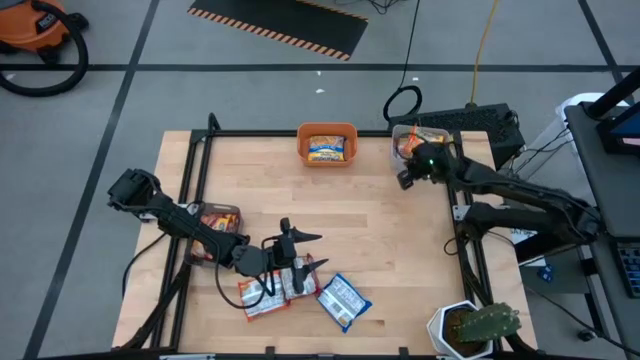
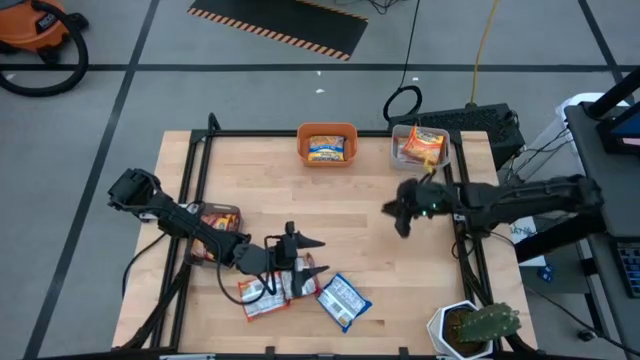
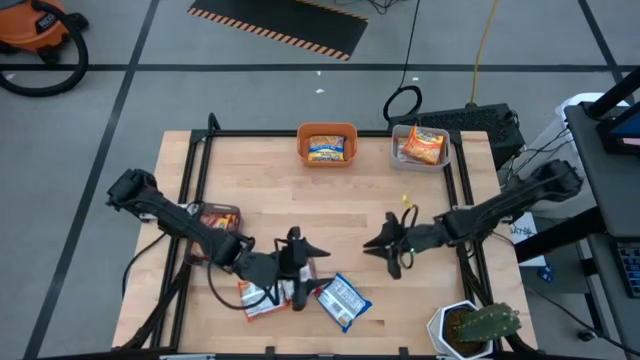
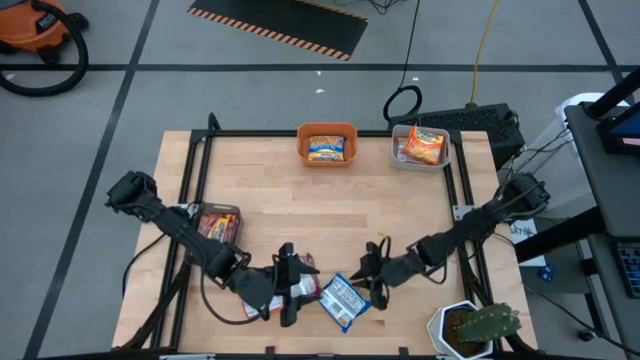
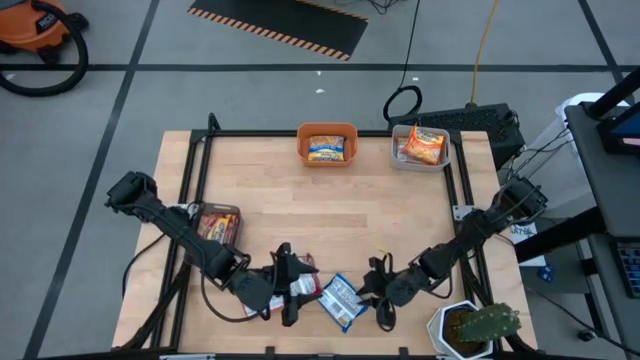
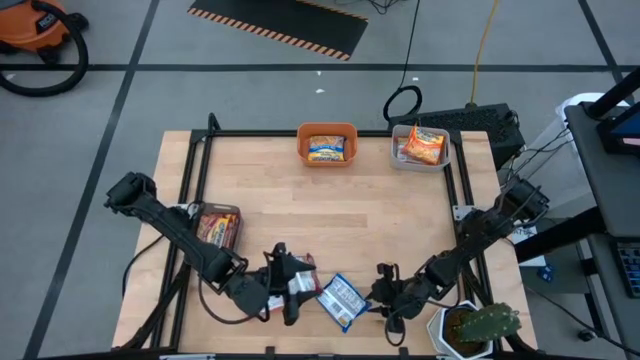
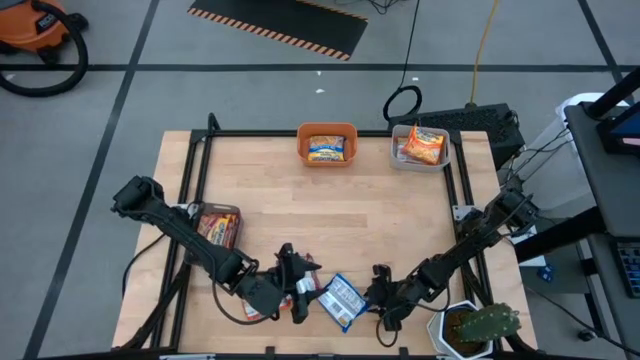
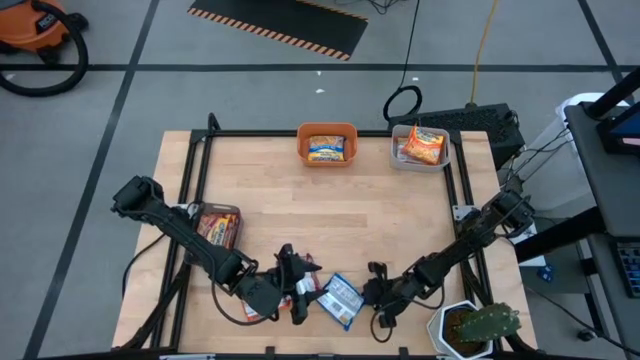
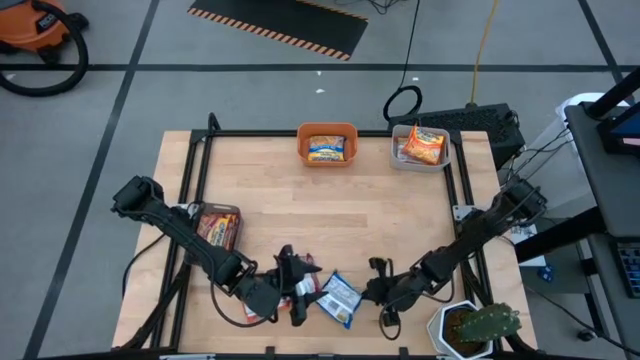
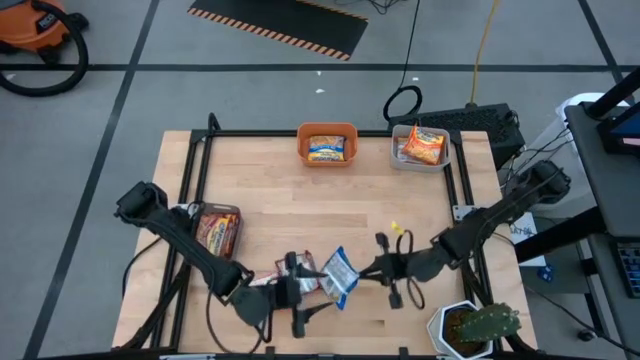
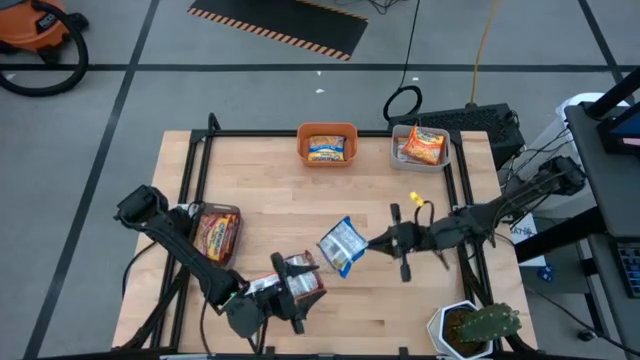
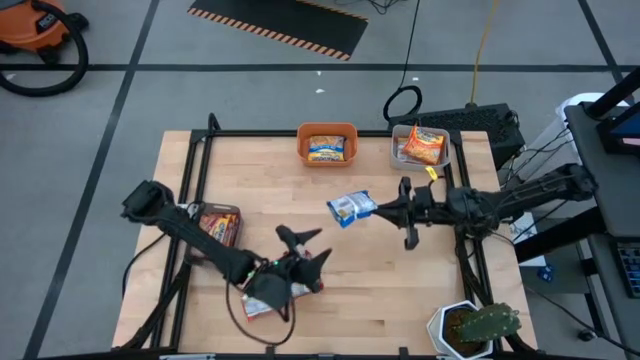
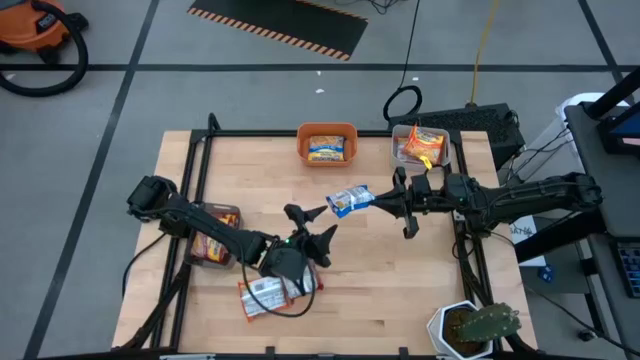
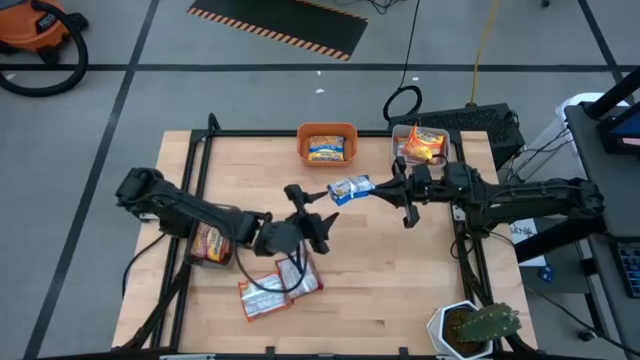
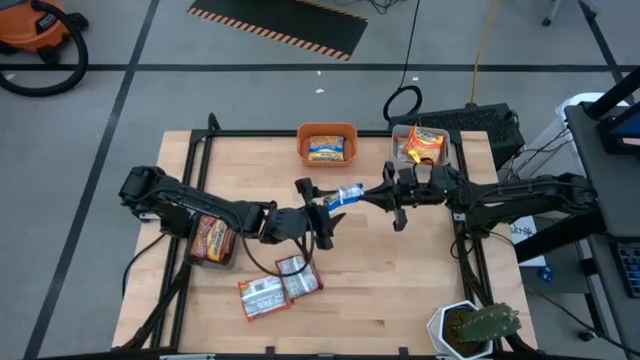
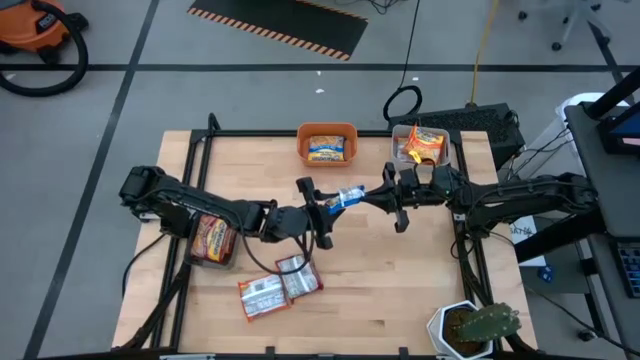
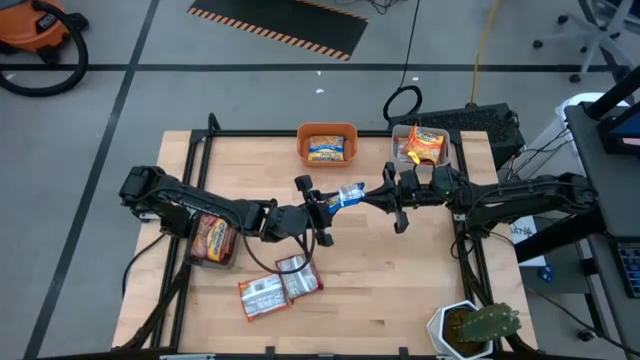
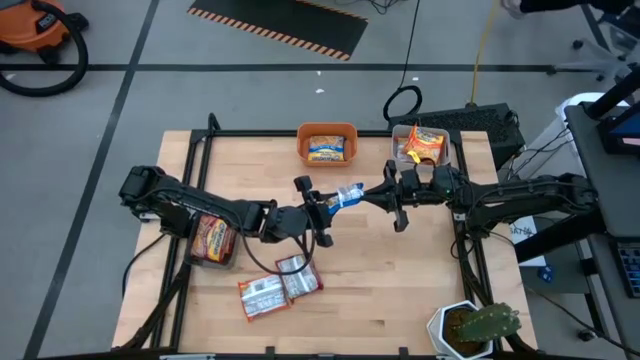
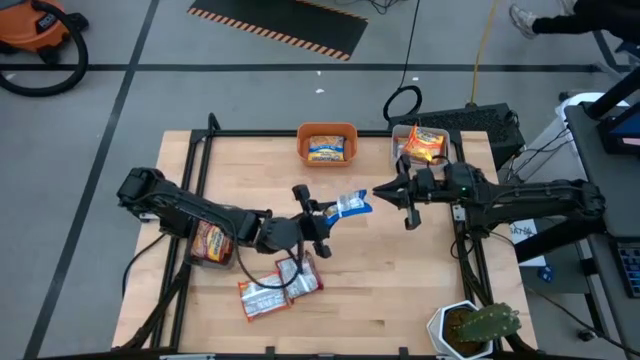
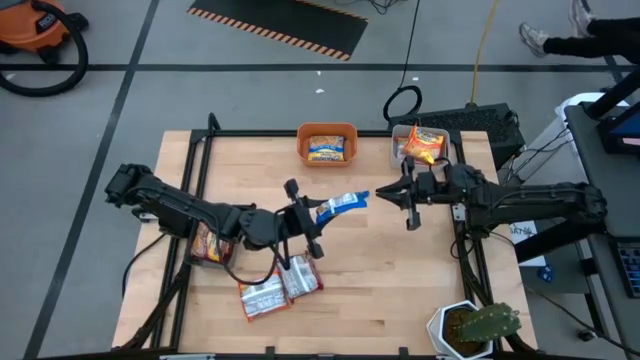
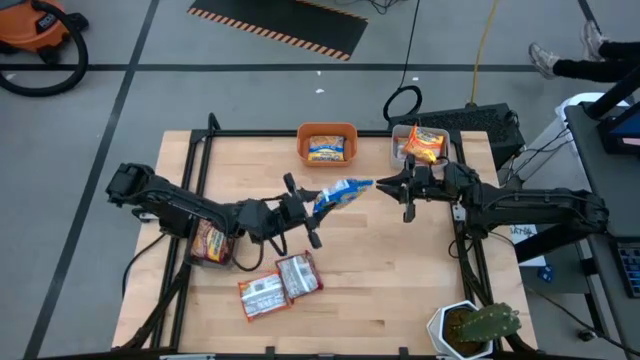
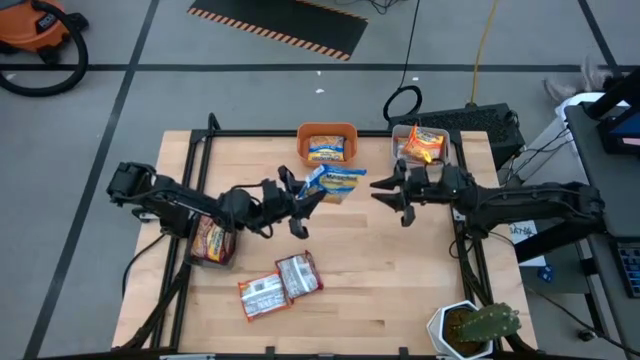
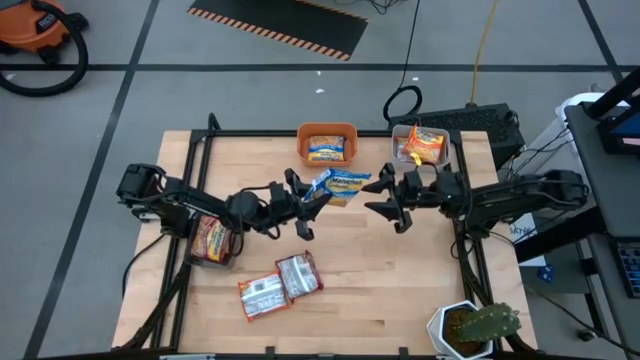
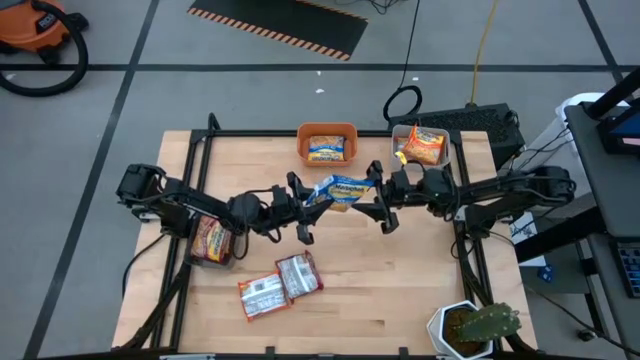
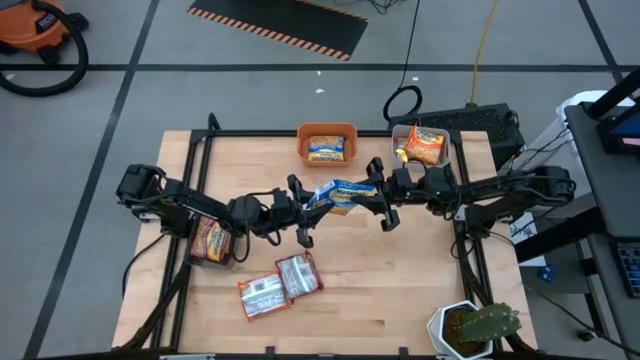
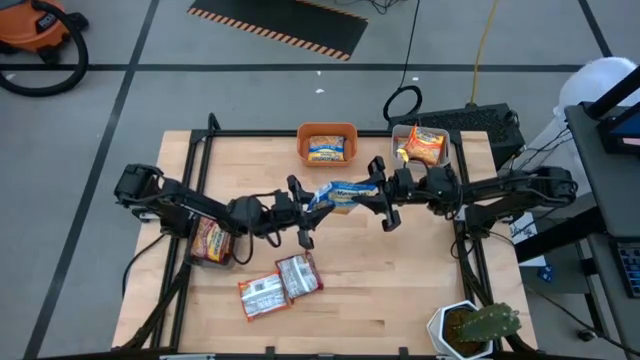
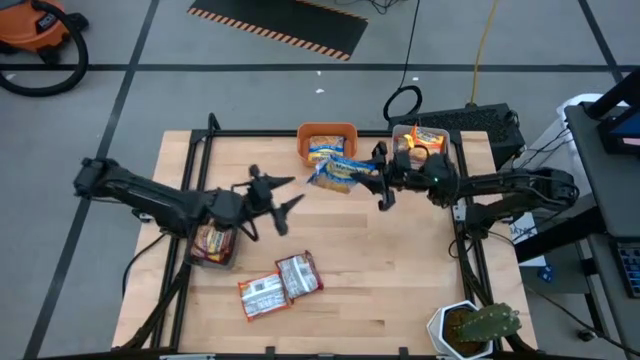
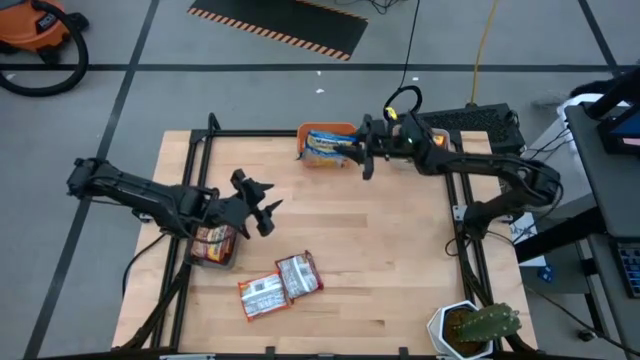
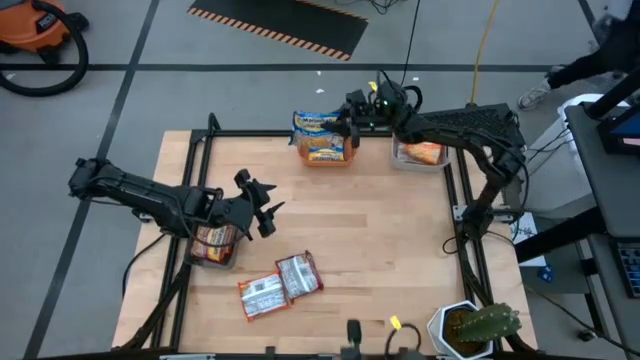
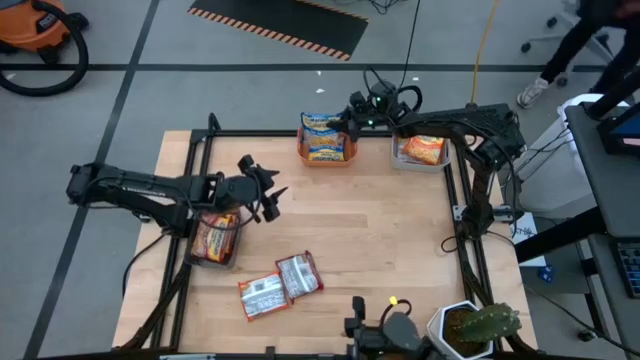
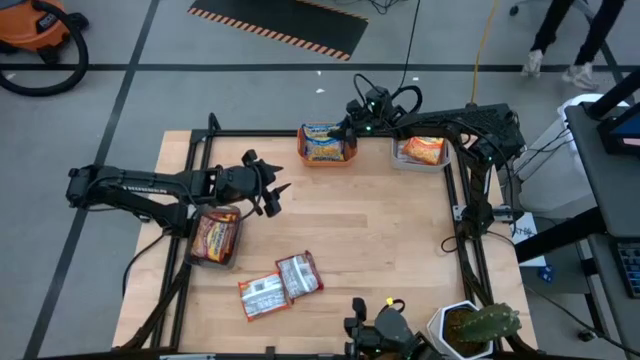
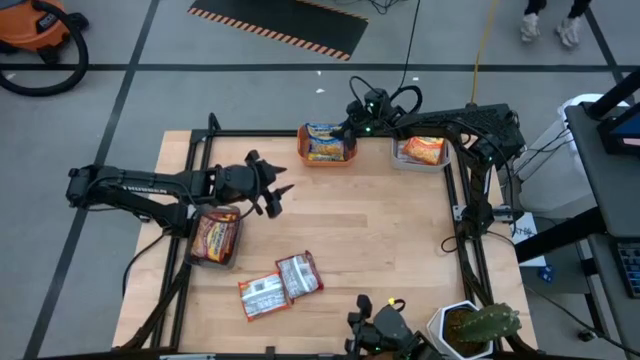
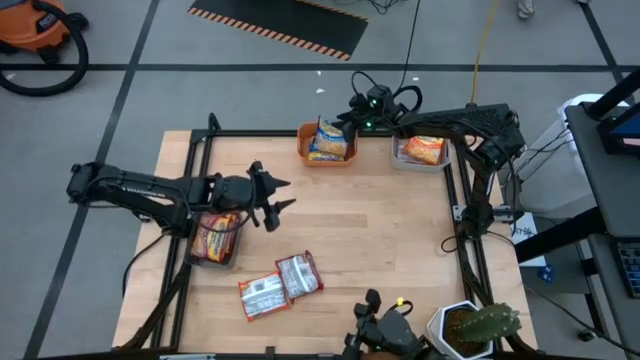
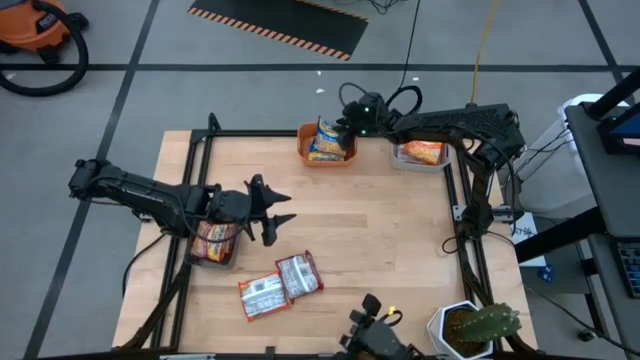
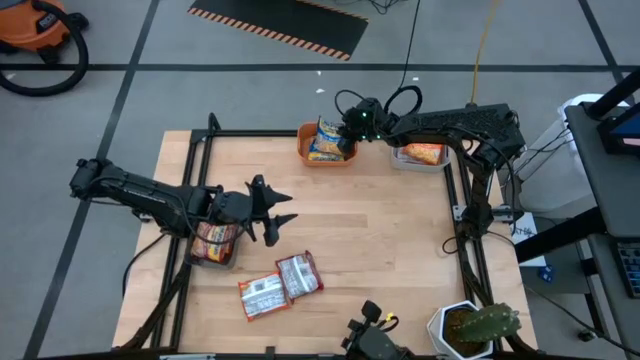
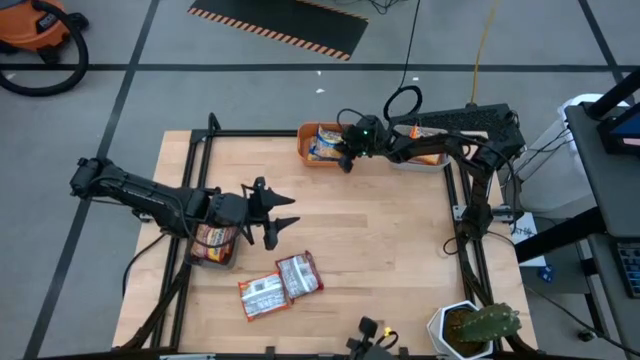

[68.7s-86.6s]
Task: Sort Maruchan noodles
Put the blue noodle pack into the orange bin

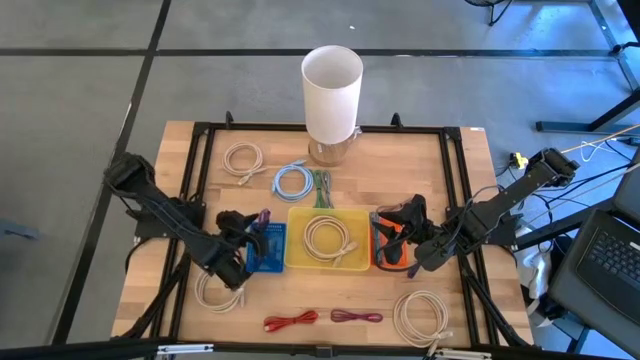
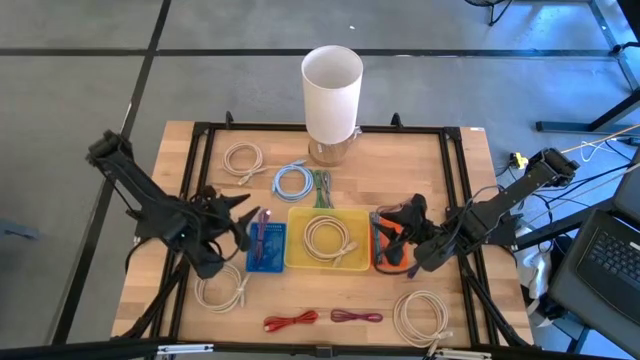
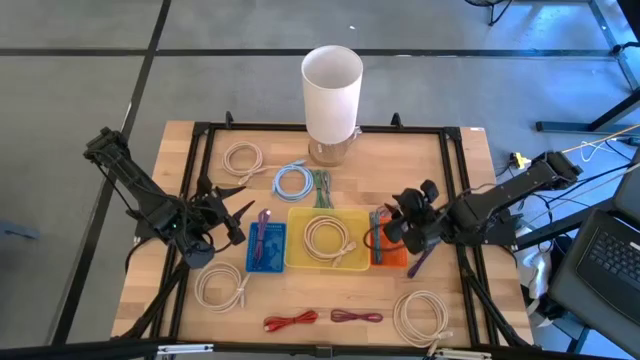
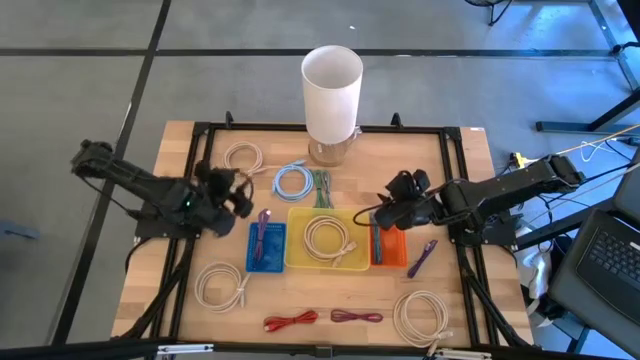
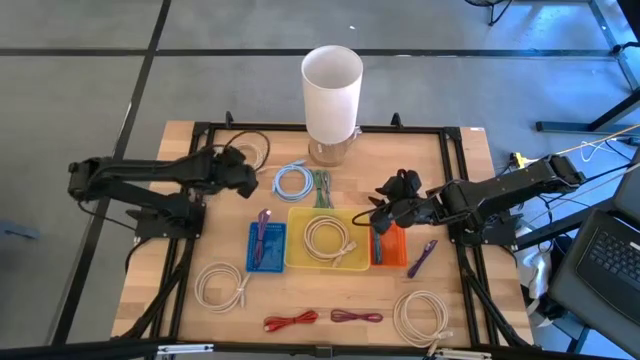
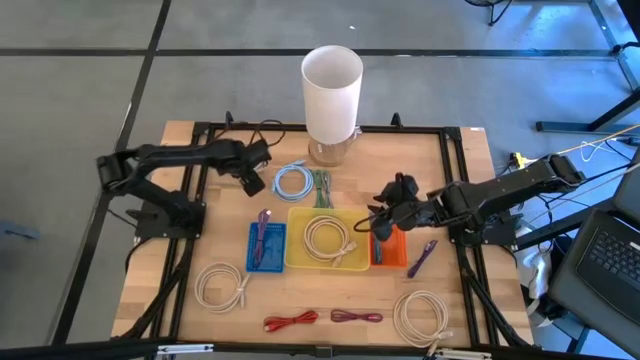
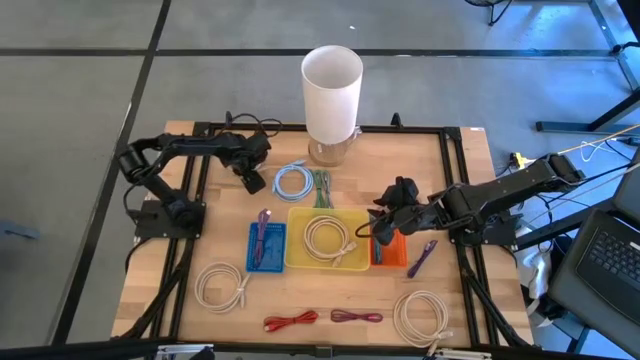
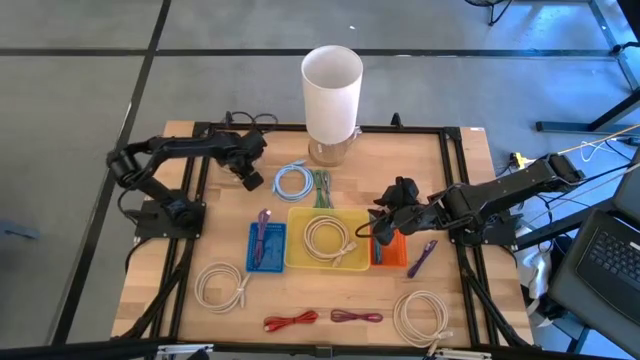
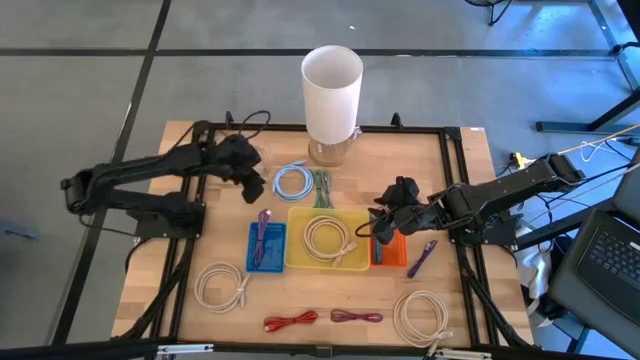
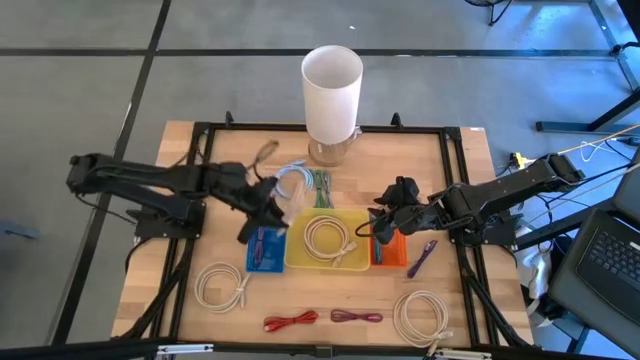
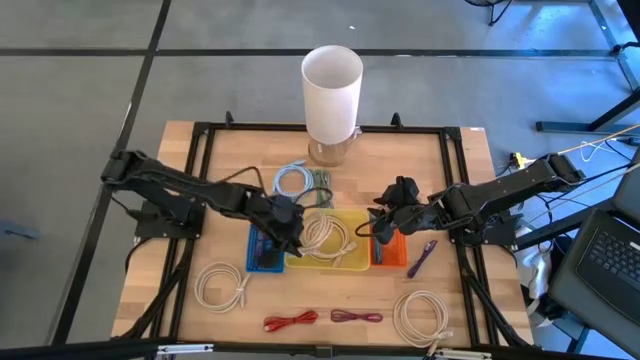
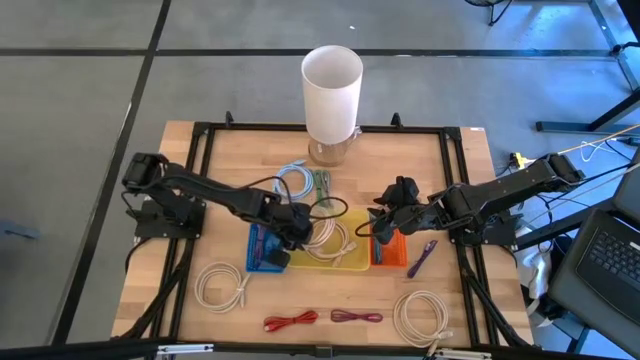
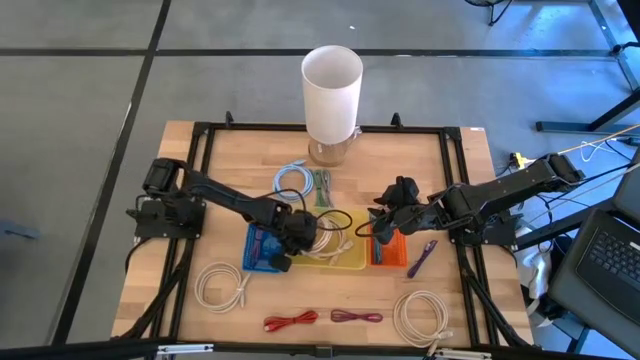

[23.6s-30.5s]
Task: Pick & Place USB Port
Put the top left white charger cable into the yellow bin
